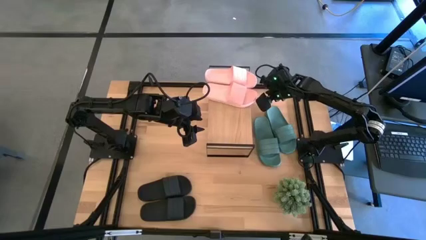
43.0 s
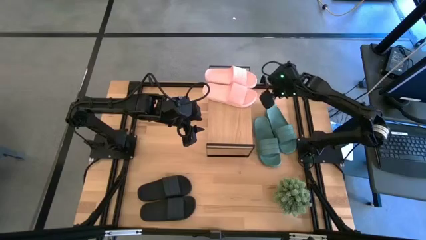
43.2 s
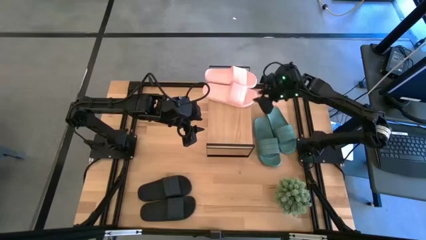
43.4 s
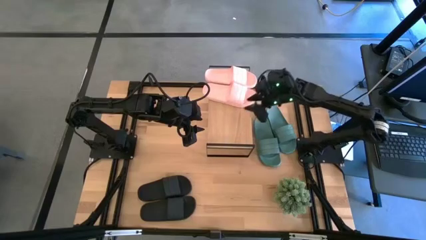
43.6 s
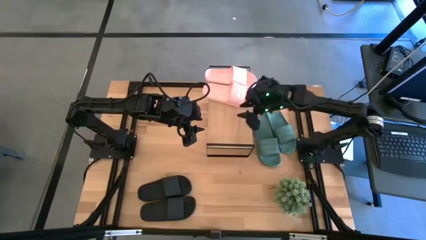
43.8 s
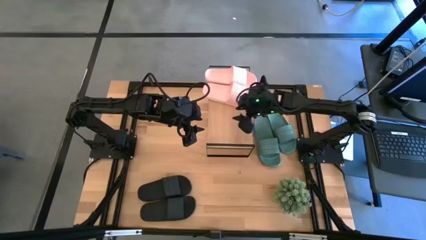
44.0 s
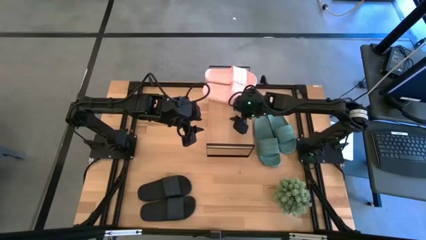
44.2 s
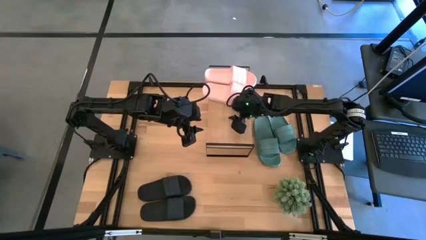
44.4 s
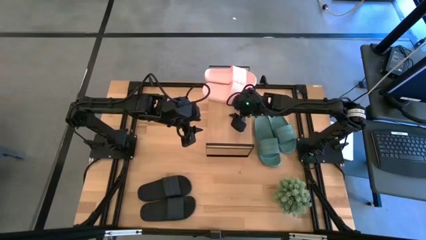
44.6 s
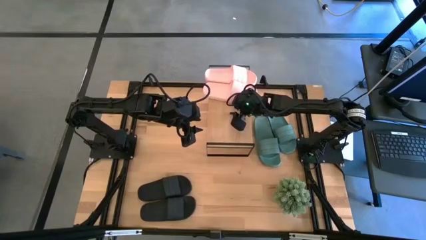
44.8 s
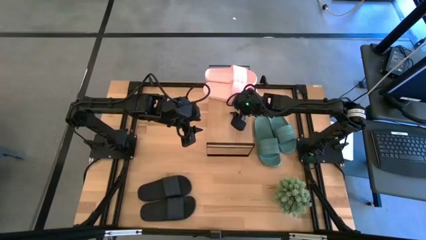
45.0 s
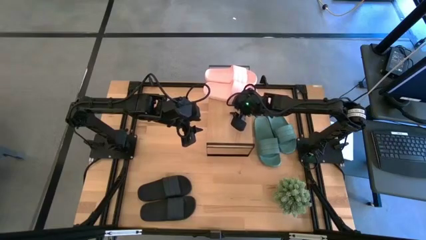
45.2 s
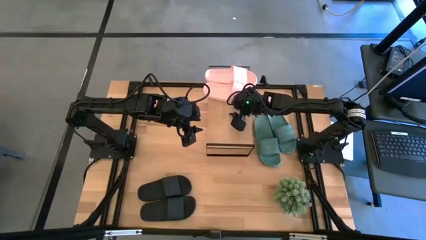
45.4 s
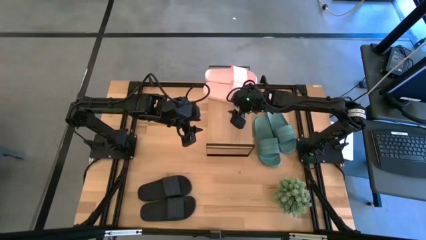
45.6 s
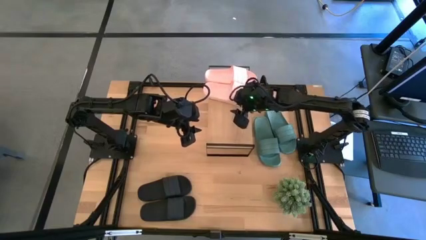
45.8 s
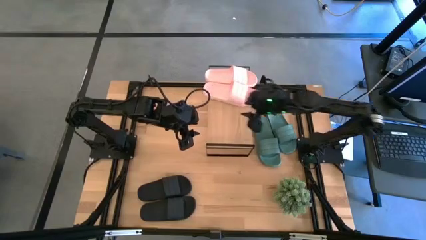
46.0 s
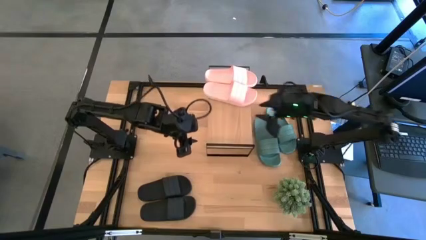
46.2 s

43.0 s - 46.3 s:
Task: Pick and place slides into the shelf
Adjust the shelf

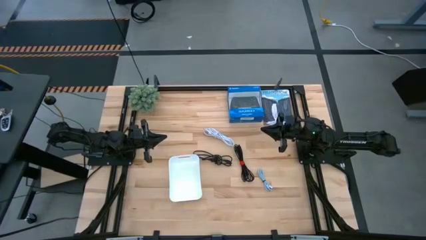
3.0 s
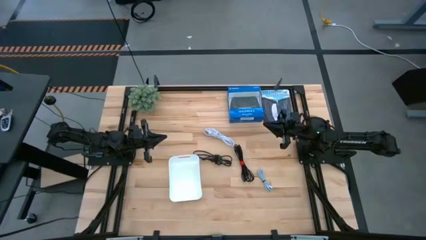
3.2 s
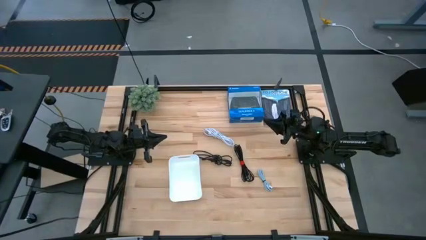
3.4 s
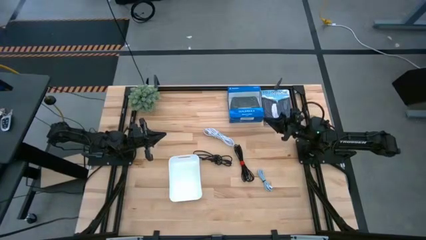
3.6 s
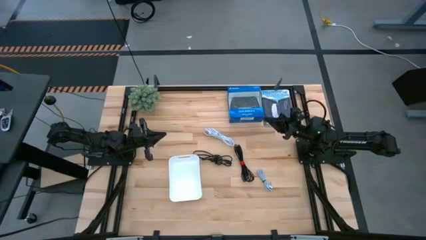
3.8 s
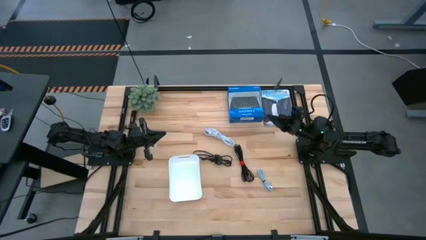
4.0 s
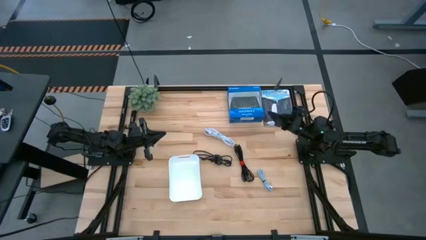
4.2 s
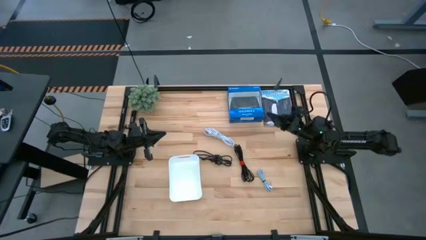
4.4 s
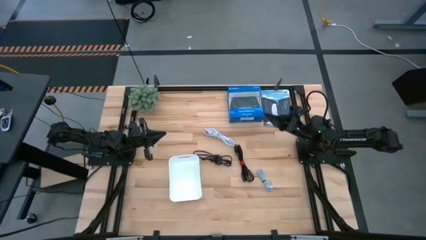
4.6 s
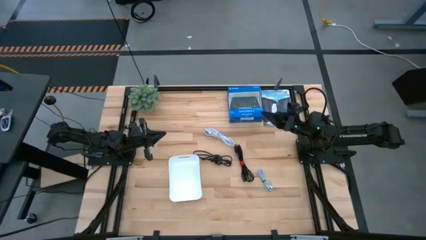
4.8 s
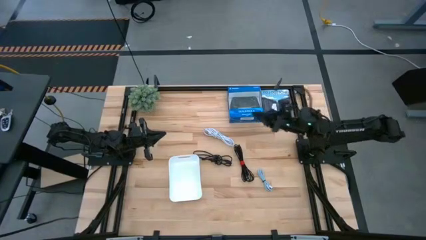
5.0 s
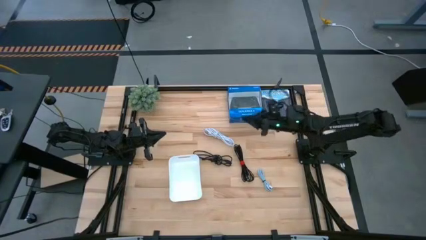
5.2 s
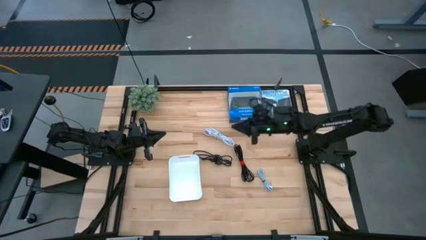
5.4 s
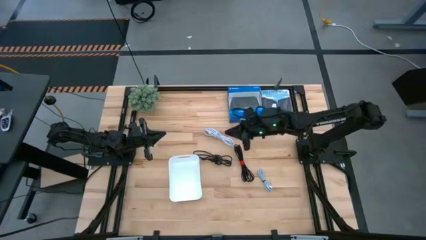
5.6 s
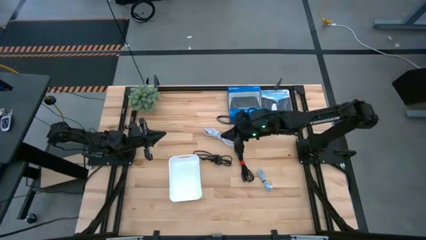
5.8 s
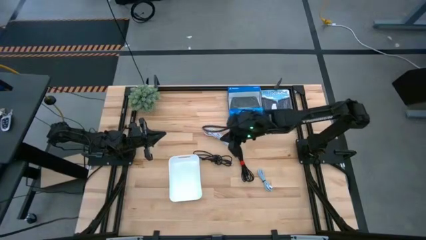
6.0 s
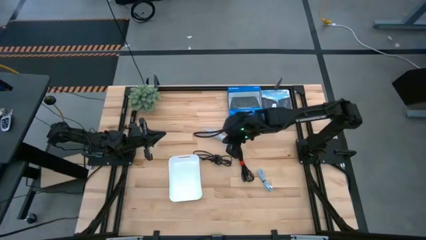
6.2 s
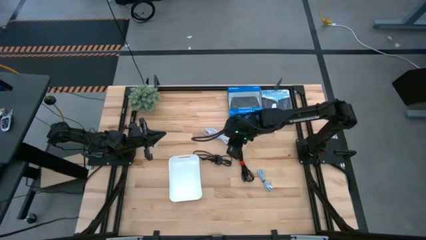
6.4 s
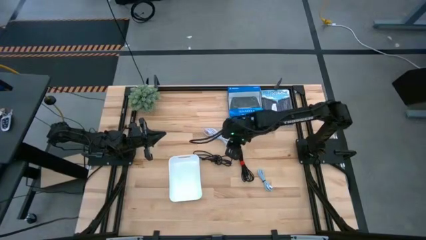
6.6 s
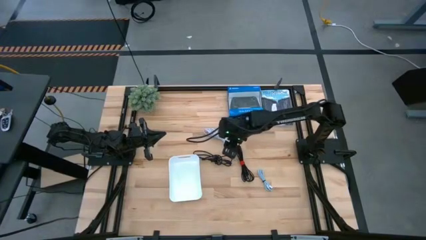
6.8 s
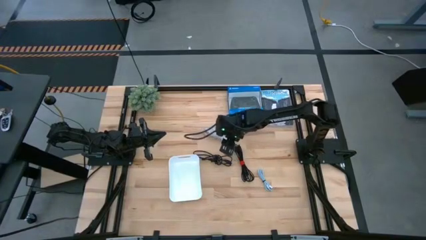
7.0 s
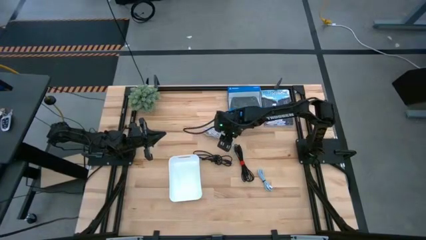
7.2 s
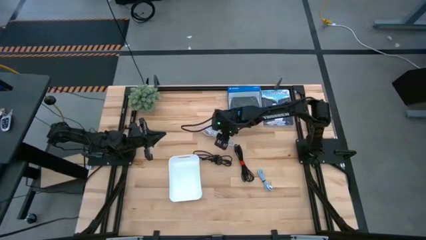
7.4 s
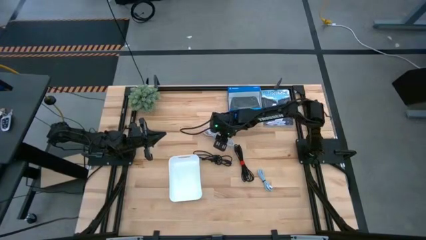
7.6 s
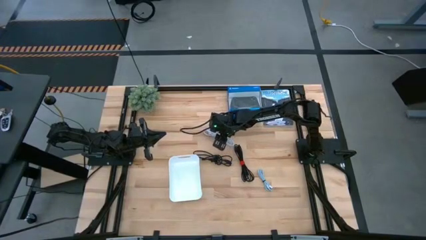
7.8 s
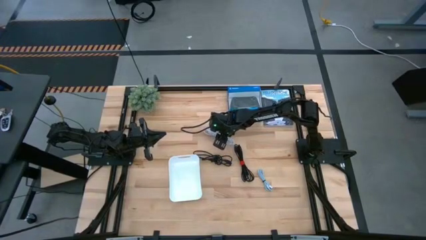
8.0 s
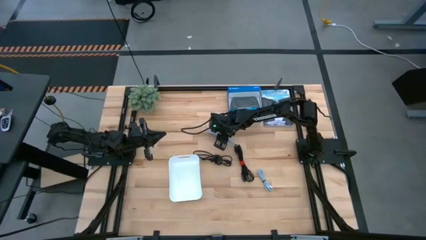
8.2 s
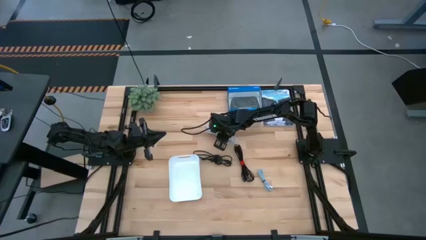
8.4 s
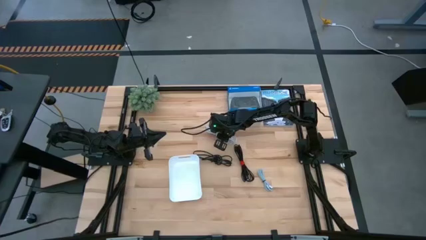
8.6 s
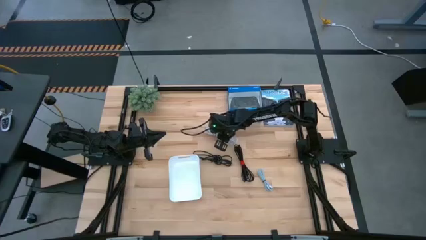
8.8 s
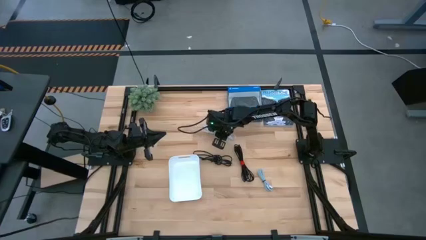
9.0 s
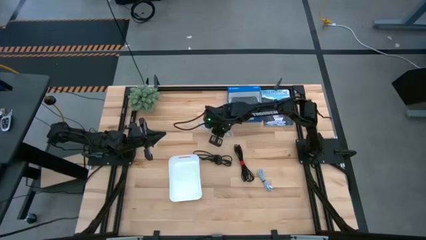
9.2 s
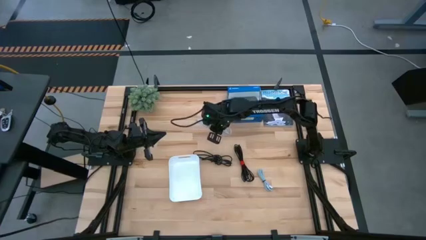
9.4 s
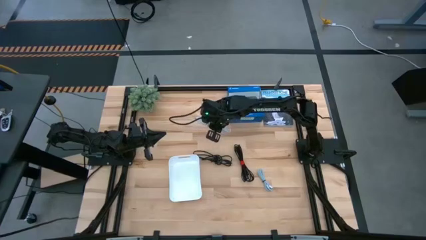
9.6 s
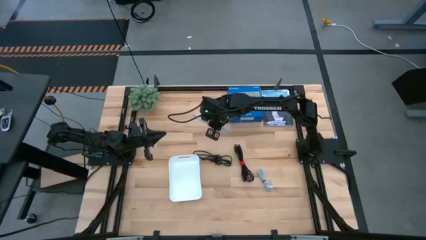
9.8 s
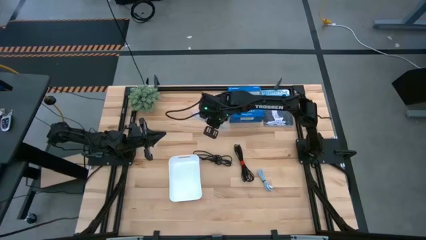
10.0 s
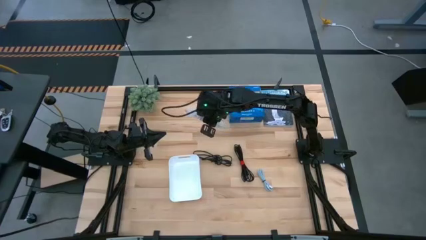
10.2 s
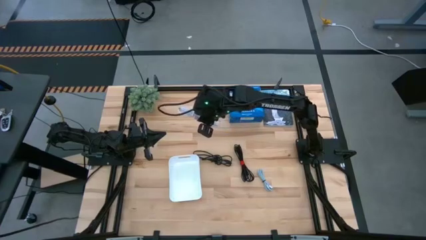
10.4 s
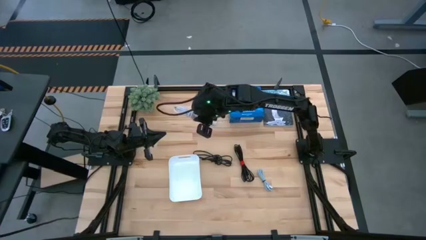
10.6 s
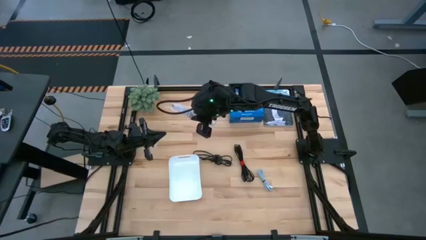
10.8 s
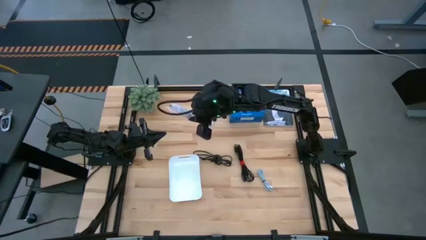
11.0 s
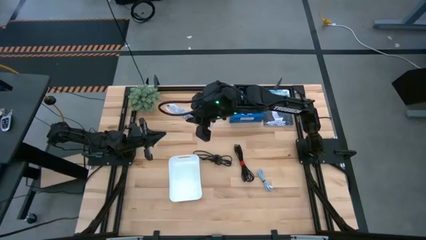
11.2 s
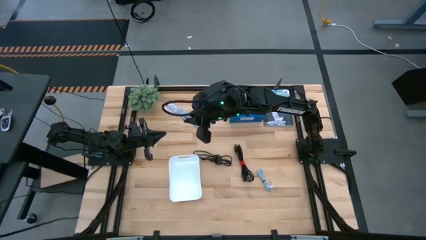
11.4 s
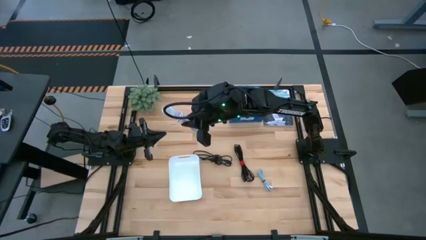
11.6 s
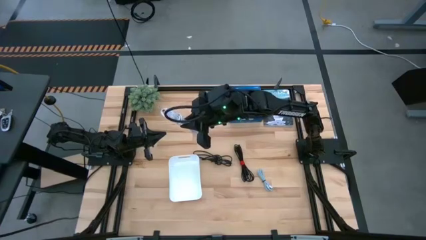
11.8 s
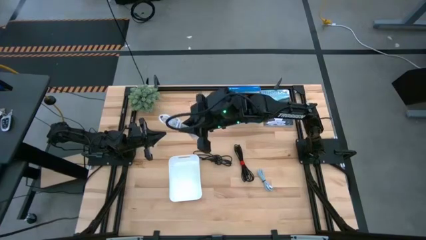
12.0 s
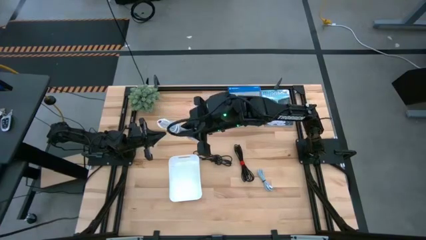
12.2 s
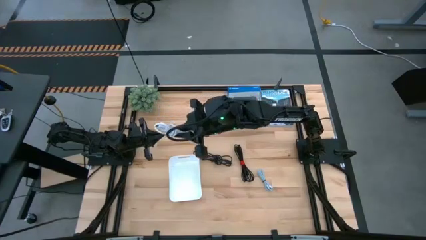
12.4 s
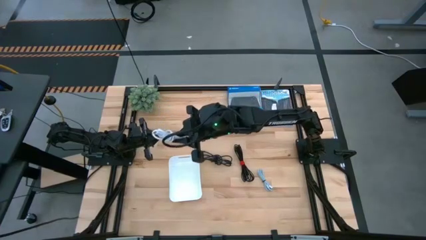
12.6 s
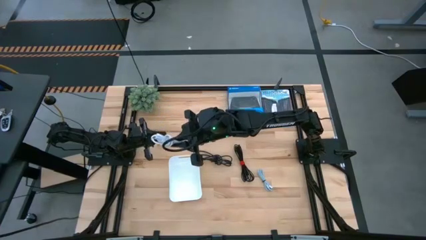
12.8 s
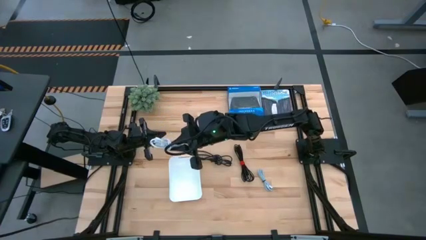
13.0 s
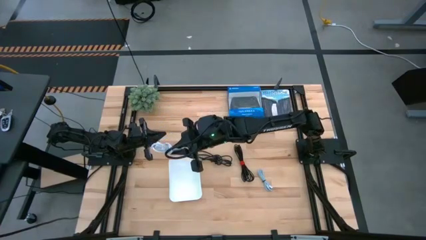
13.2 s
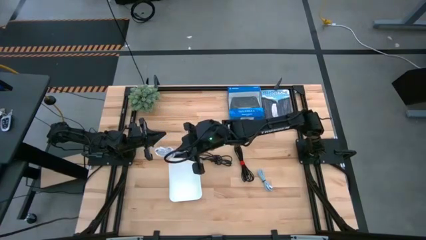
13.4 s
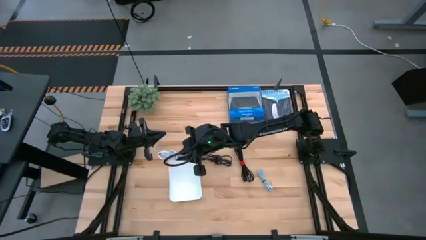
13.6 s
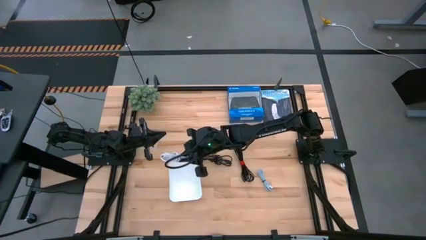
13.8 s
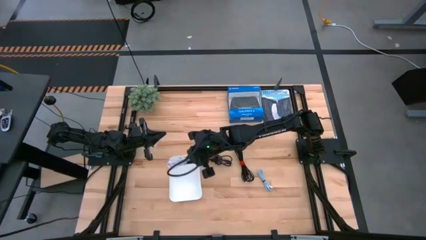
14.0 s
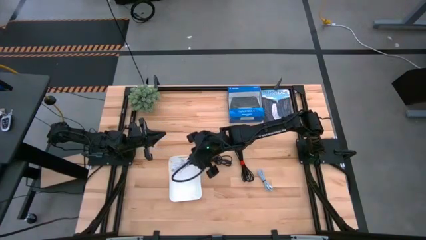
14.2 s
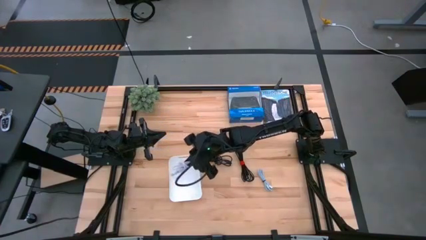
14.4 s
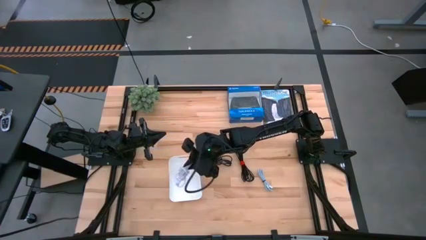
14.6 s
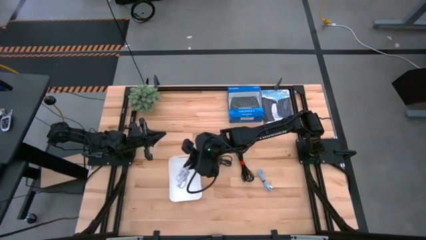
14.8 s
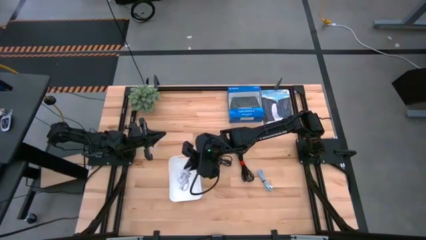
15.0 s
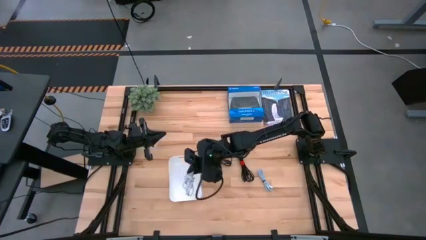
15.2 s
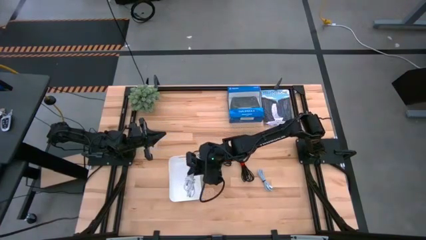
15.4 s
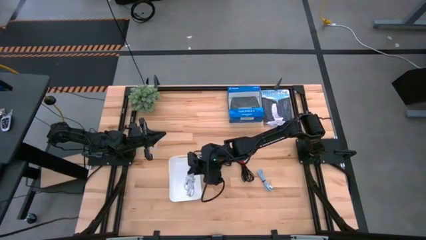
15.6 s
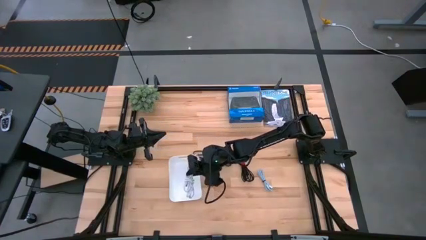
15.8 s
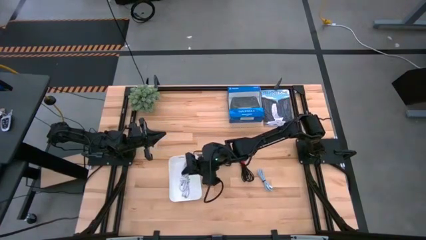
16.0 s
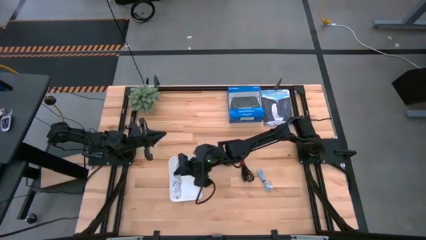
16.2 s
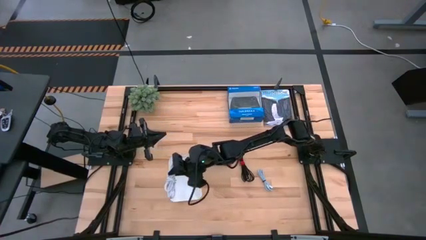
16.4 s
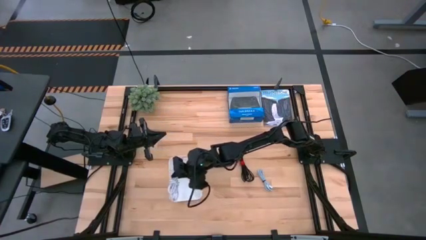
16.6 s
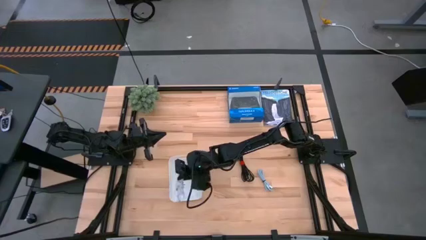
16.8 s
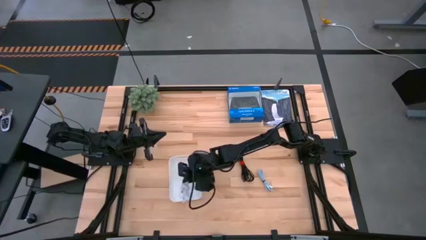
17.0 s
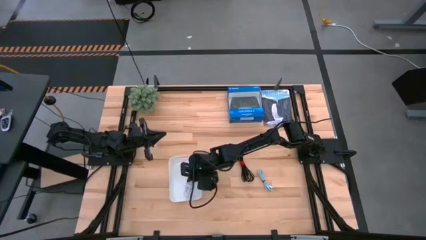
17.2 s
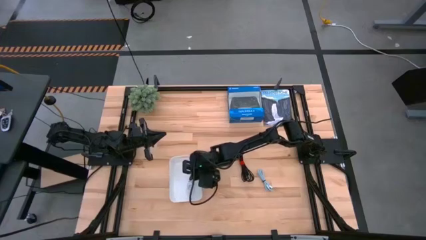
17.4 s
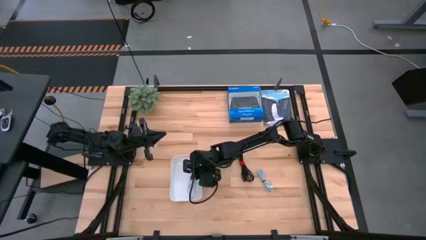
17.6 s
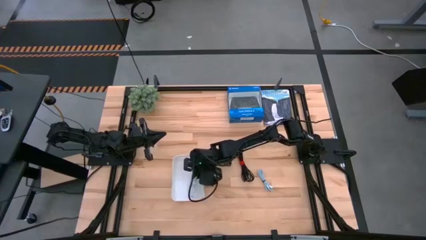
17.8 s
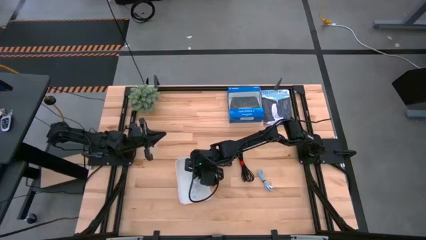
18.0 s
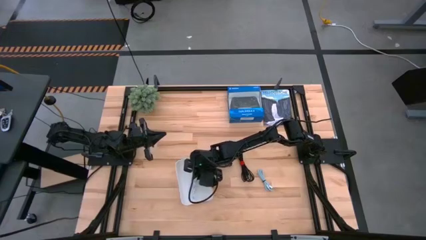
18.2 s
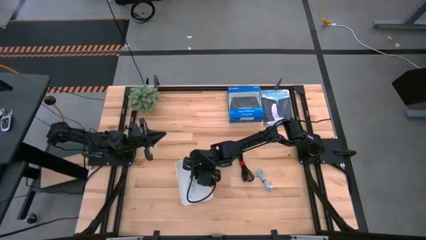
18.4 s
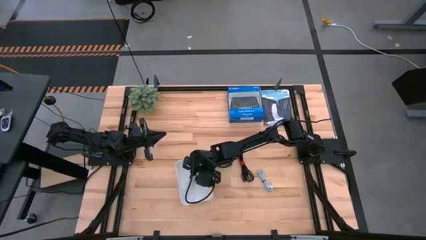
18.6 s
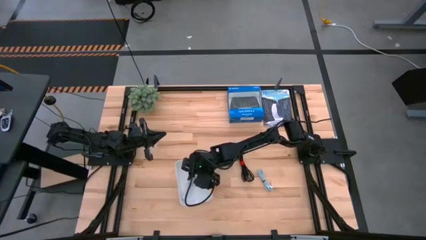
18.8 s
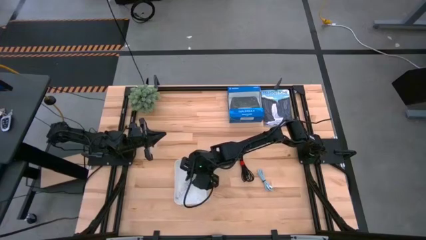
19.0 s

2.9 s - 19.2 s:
Task: Pick and place USB-C Cables
Put the white USB cable into the white bin
